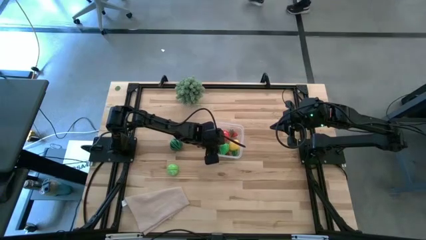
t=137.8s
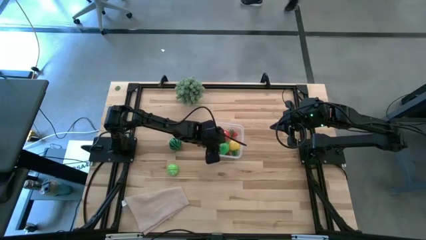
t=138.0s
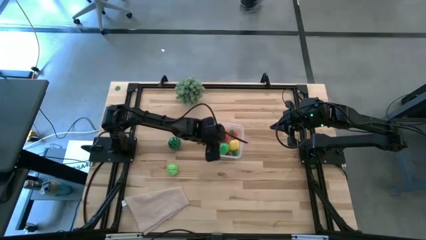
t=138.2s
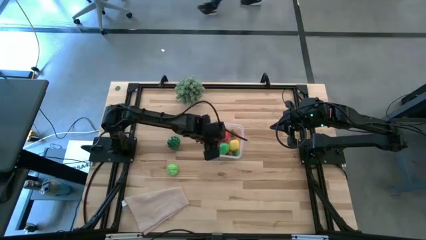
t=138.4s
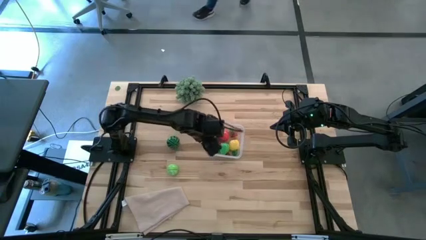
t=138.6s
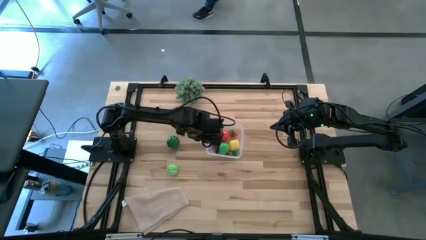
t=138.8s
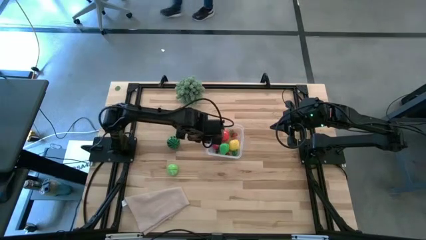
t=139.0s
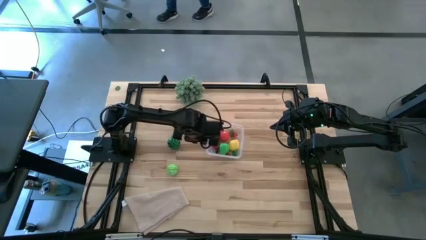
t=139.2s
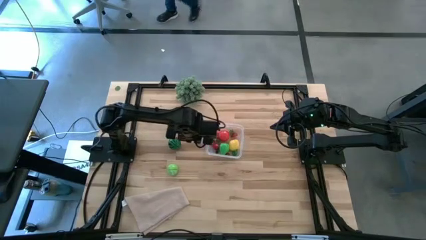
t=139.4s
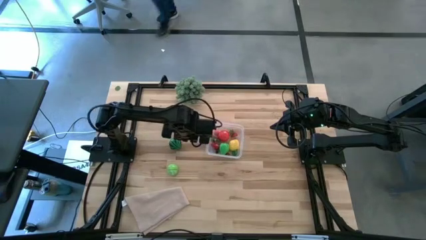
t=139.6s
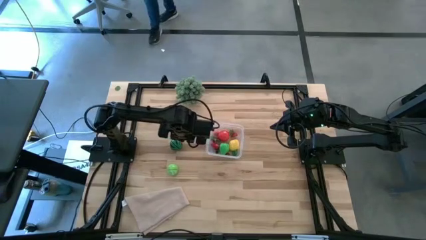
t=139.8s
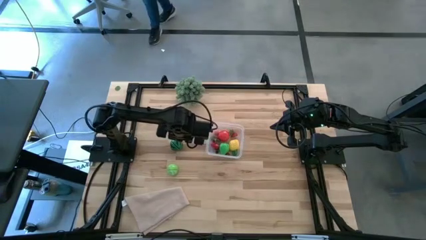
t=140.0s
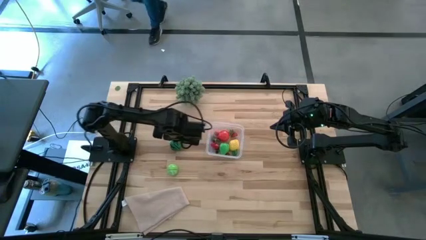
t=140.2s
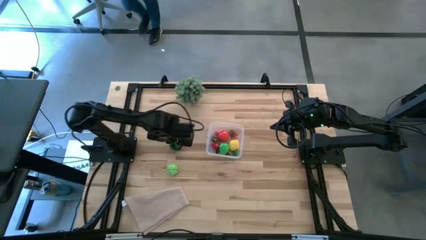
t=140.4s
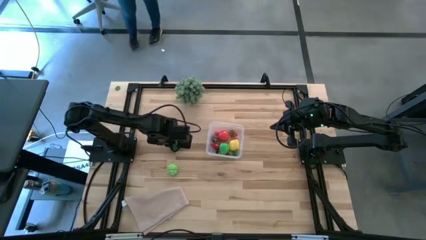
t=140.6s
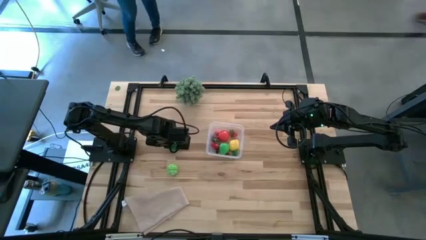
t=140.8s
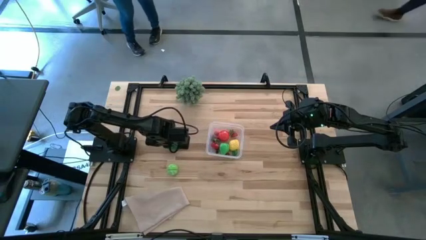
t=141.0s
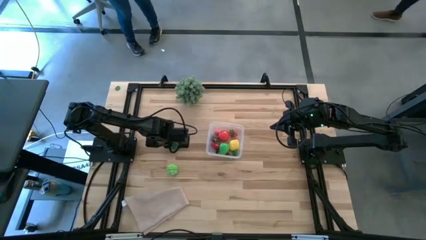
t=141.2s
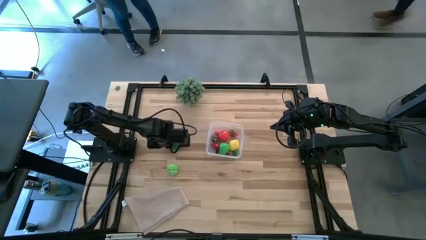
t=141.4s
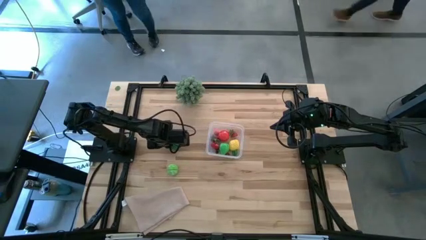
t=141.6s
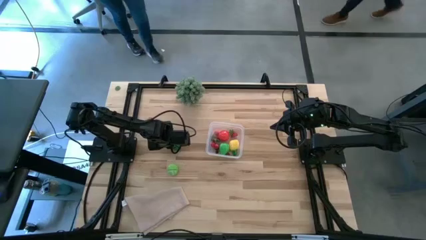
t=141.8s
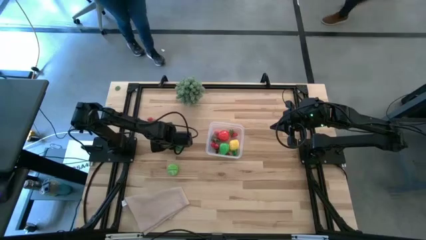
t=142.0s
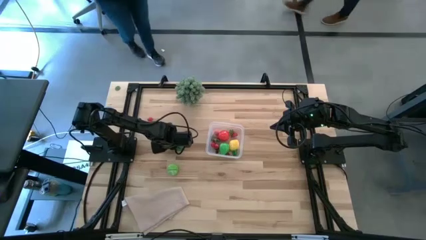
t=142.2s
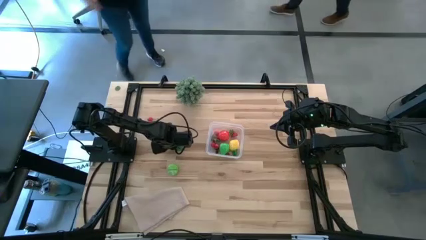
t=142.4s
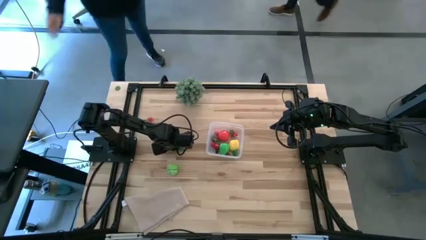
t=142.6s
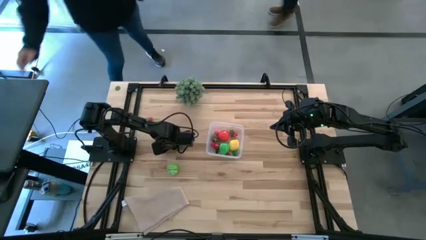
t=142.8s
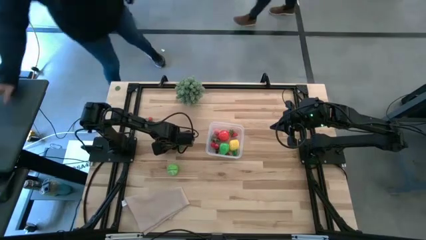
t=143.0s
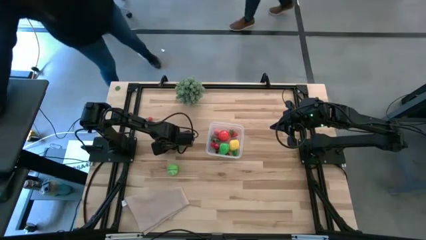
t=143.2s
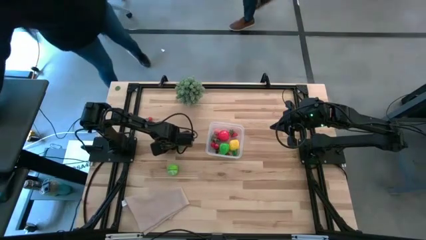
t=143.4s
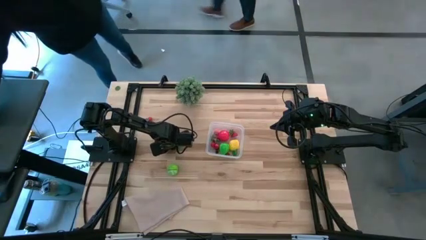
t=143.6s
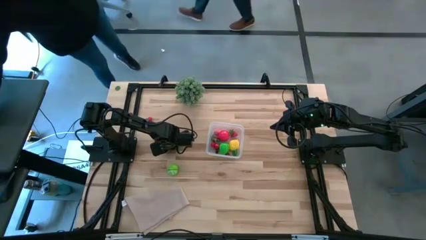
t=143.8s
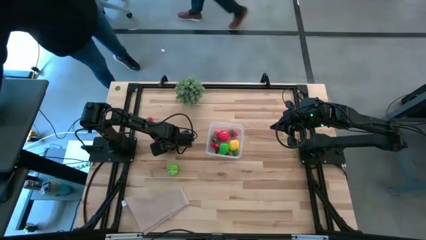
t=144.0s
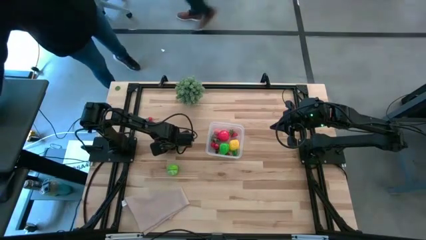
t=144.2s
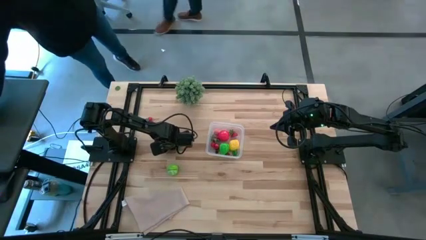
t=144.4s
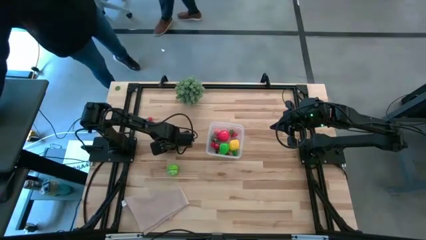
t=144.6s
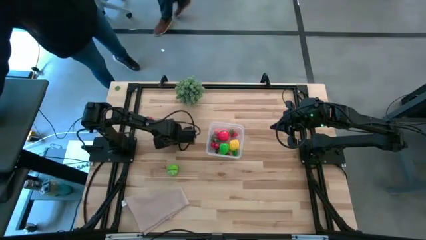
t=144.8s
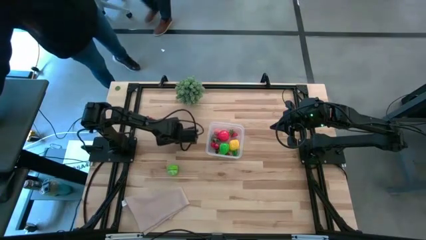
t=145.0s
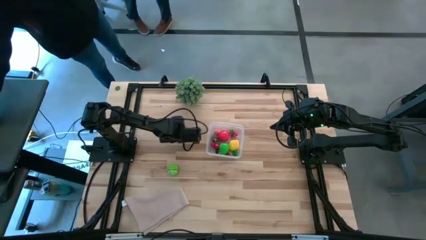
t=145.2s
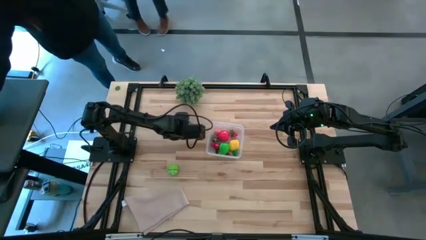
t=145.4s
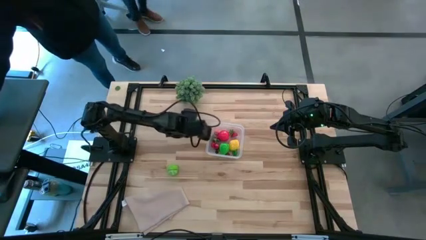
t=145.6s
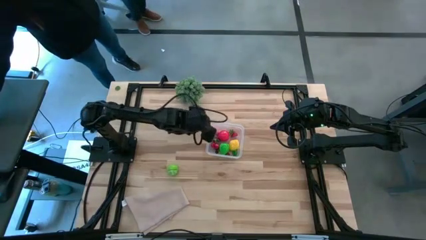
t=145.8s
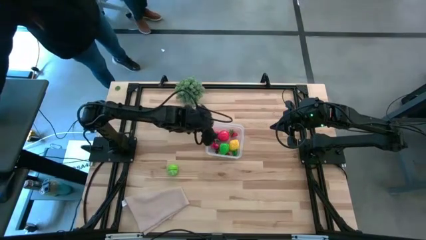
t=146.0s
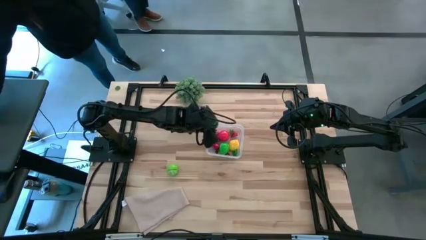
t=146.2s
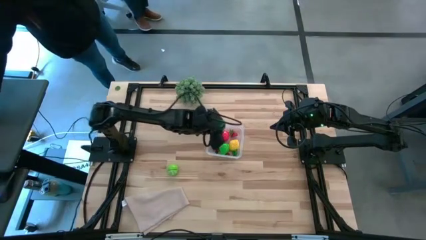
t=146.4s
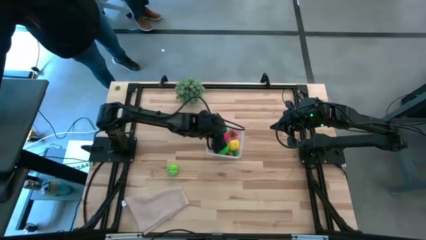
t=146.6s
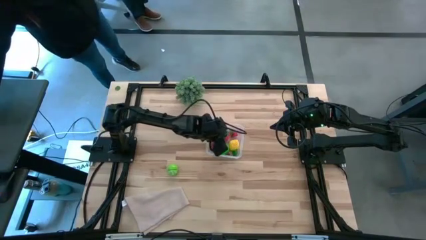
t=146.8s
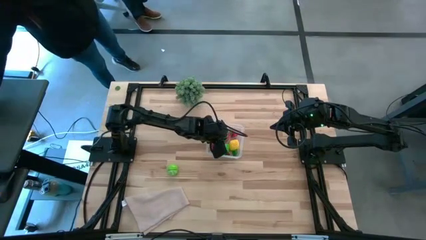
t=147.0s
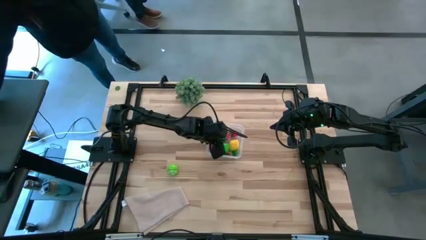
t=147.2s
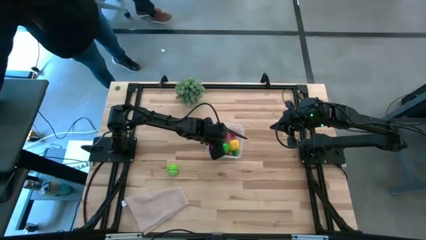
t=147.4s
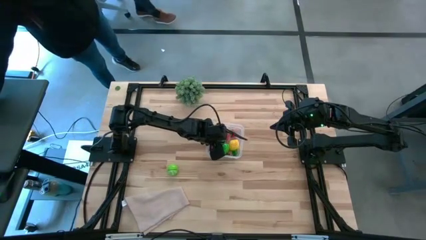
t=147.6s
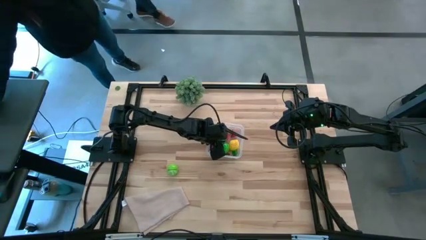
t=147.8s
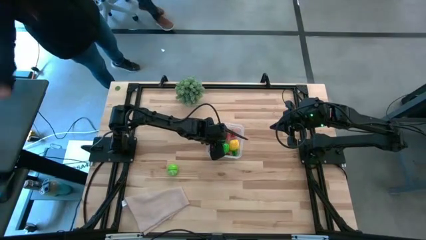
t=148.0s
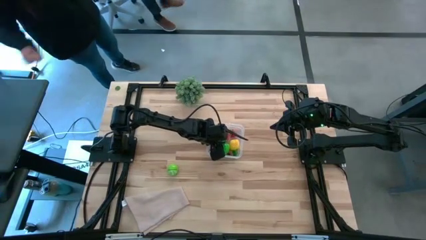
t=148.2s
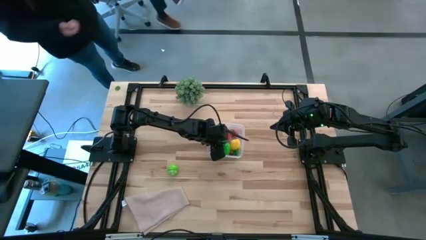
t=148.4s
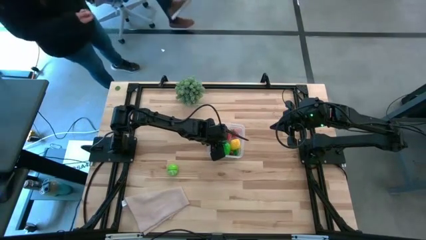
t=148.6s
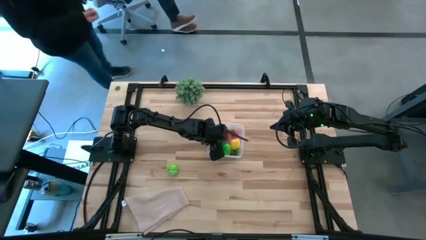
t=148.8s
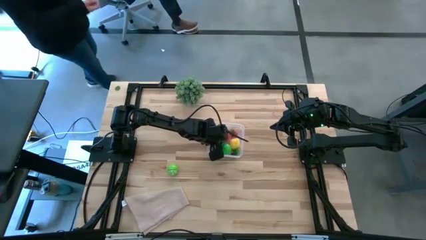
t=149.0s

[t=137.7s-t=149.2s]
Task: Pick and placing Produce into tupperware
Put the green watermelon into the transparent bin

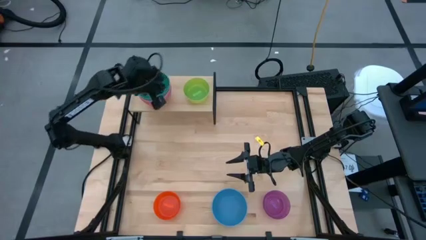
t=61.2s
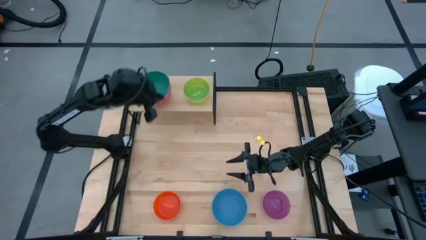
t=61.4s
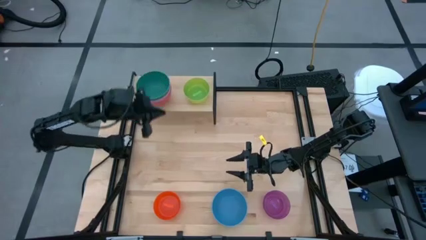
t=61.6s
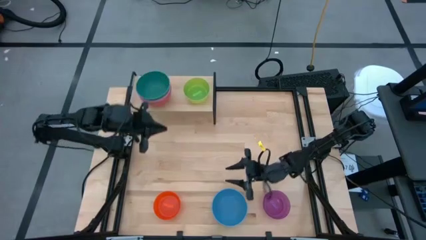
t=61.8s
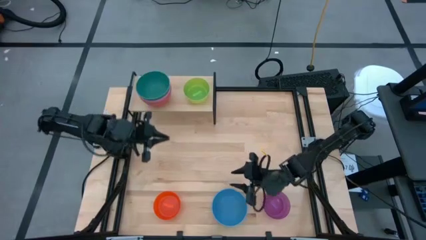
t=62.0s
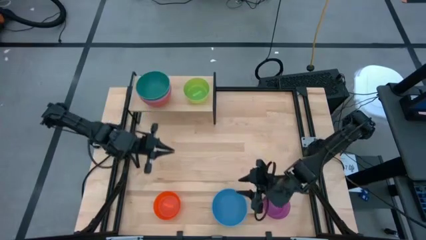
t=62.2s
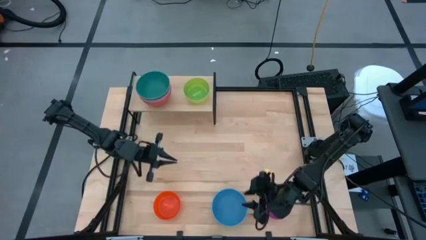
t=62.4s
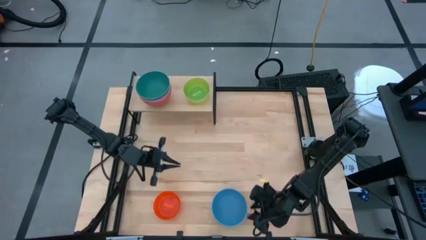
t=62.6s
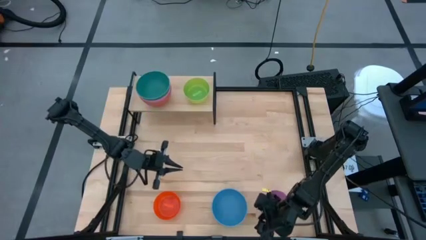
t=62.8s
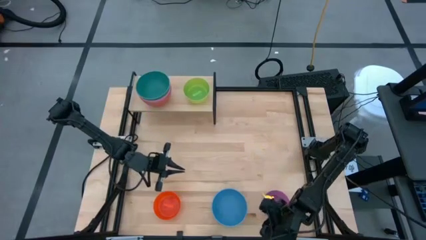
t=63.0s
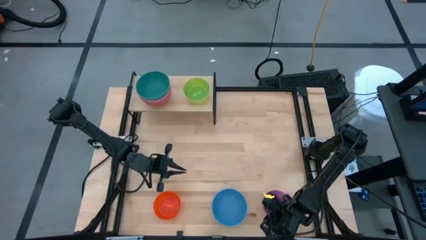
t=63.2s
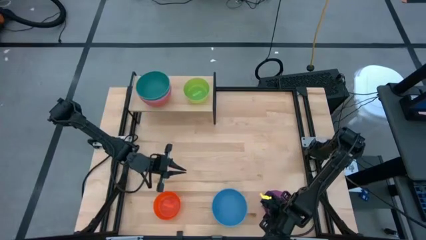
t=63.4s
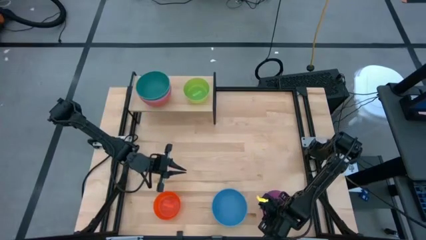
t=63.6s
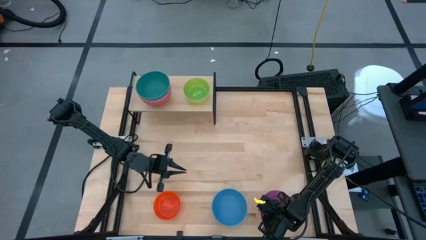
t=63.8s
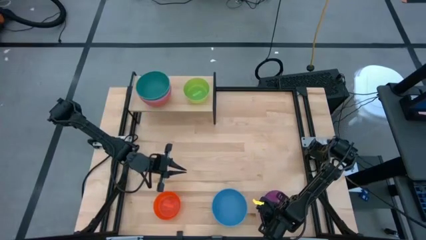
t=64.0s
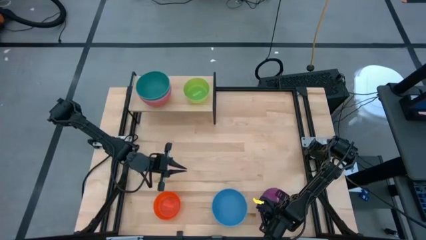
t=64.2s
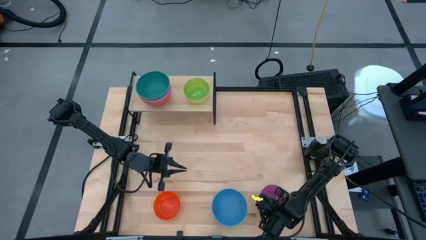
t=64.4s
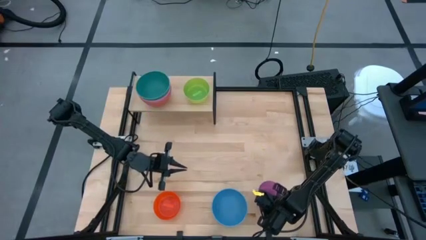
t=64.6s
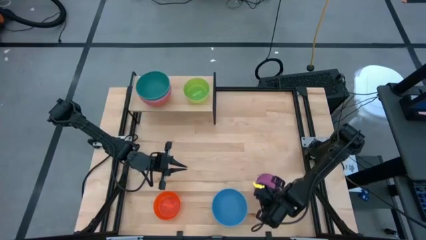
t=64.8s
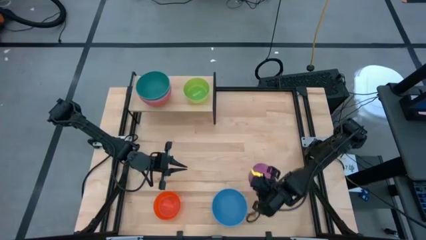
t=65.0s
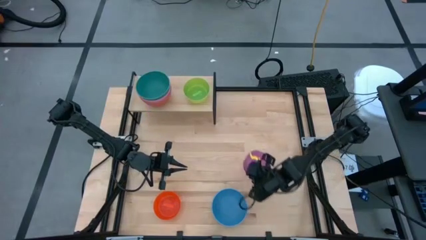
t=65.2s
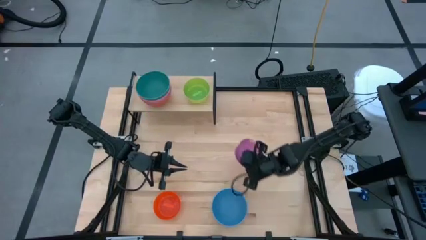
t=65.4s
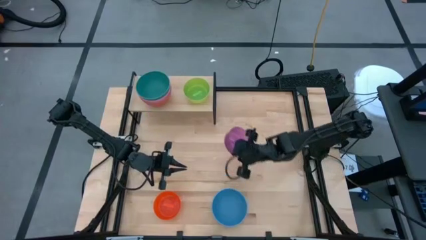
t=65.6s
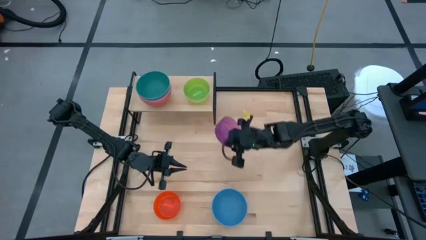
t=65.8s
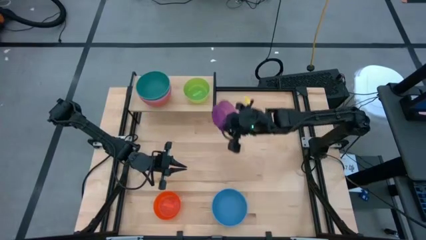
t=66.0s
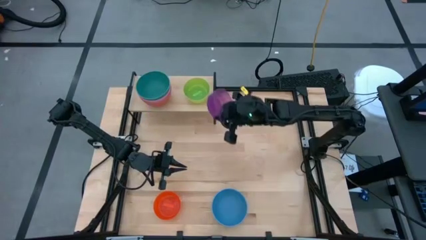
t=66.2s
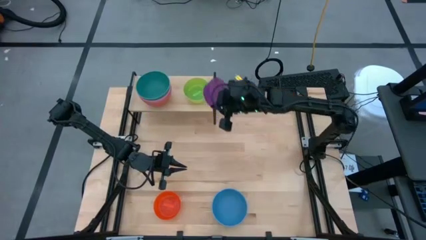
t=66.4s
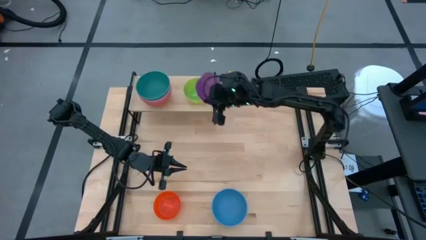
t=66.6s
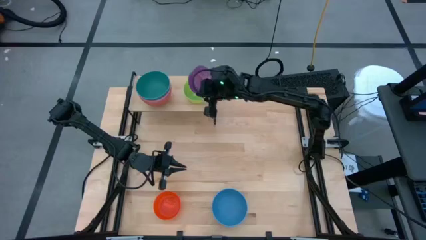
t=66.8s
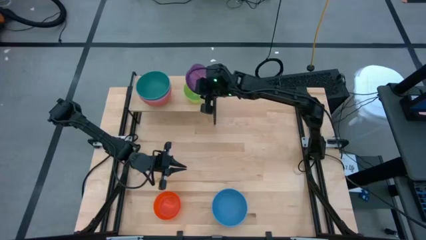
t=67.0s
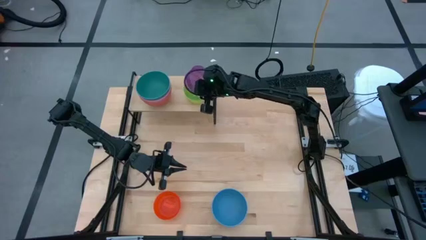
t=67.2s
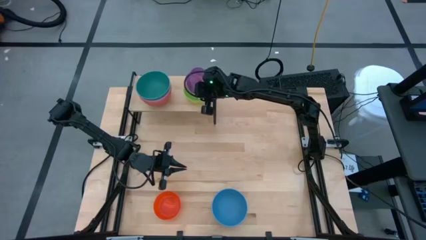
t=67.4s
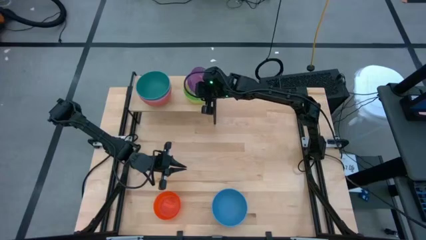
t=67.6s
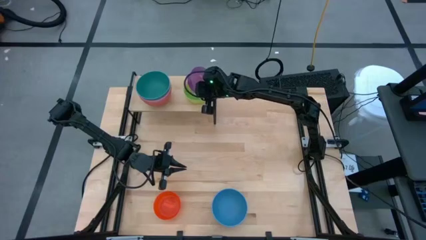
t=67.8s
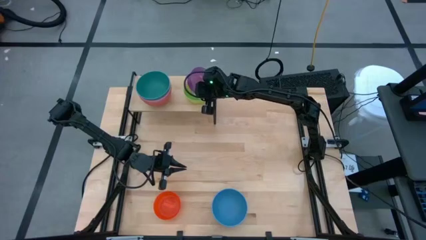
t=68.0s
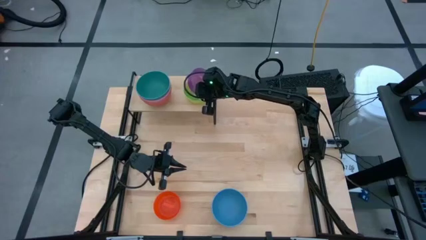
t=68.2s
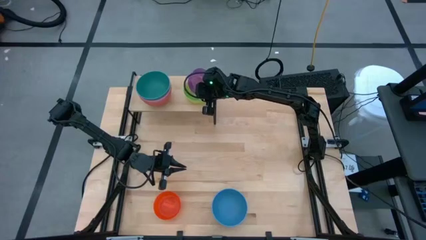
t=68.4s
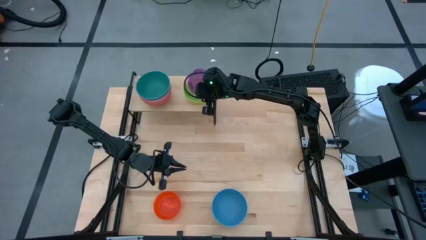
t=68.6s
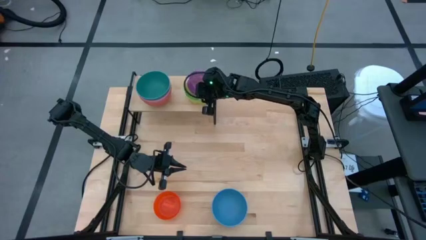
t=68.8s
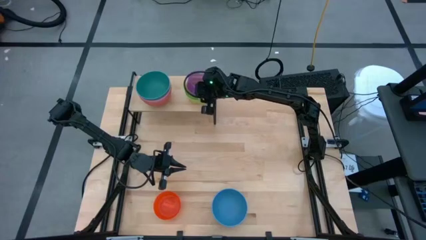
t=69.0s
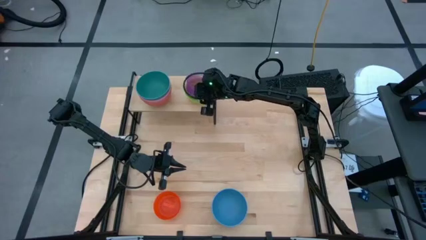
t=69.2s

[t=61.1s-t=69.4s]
Task: Place and stack bowls onto a shelf
Stack the purple bowl into the green bowl on the shelf
